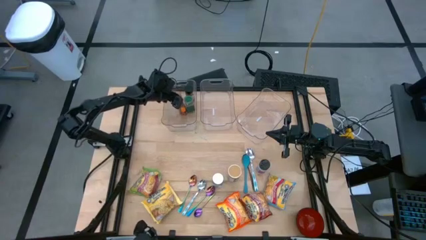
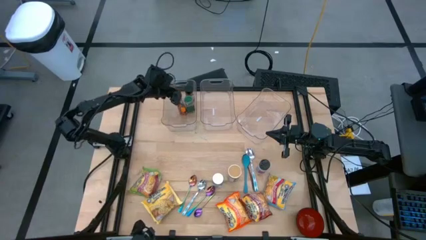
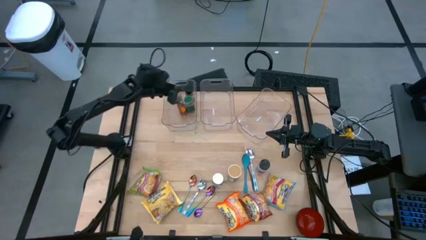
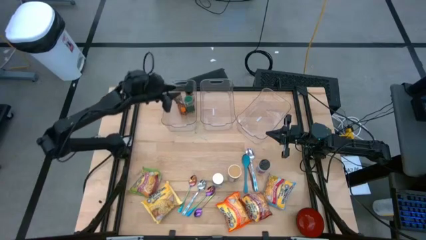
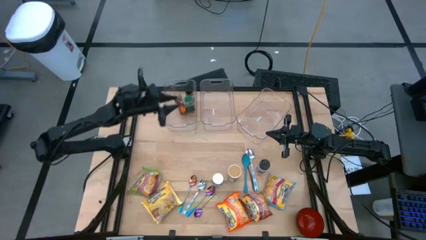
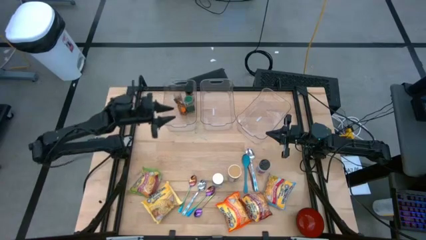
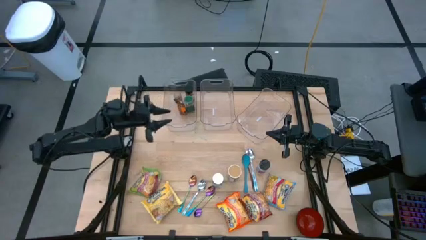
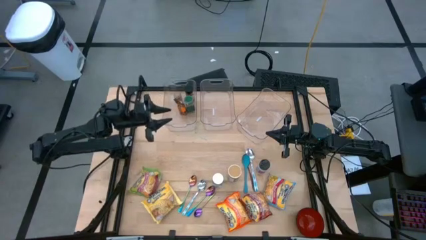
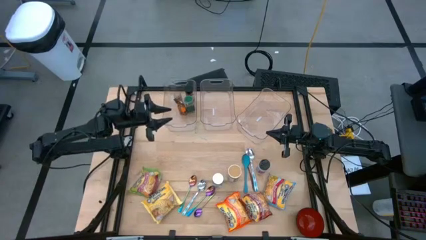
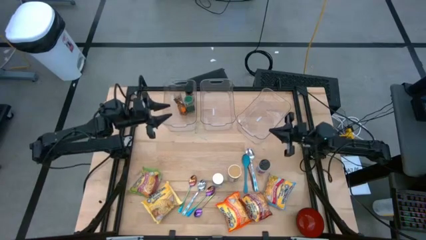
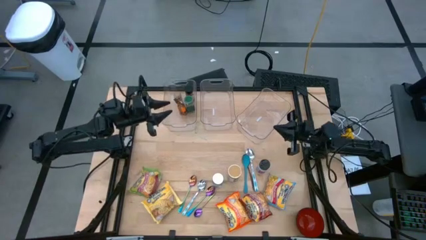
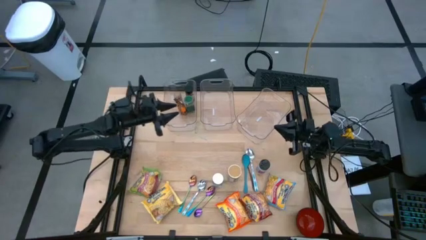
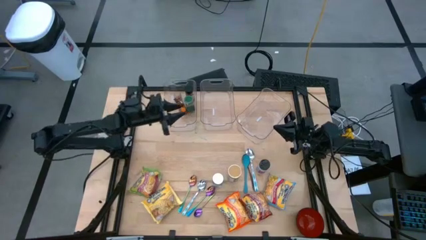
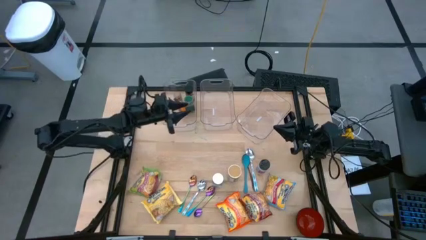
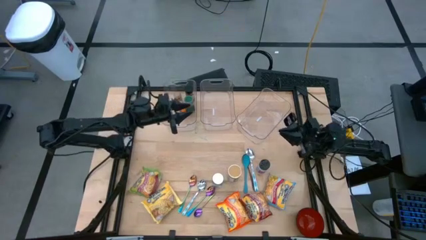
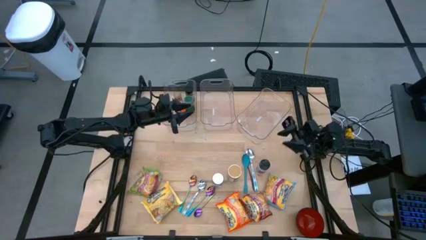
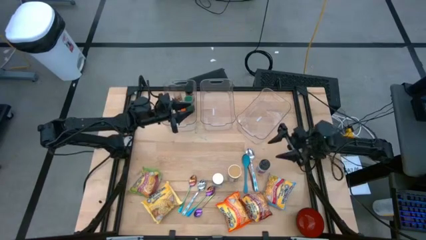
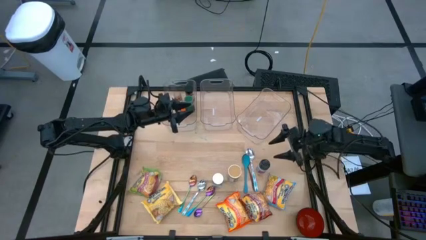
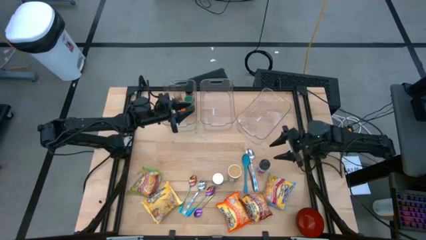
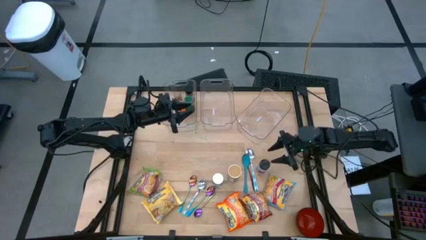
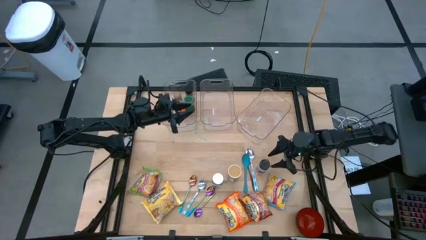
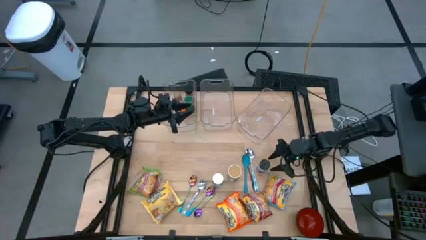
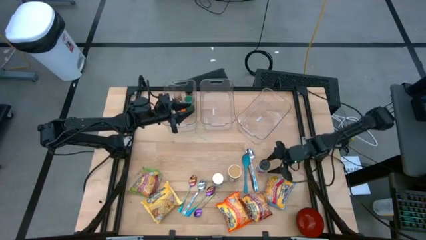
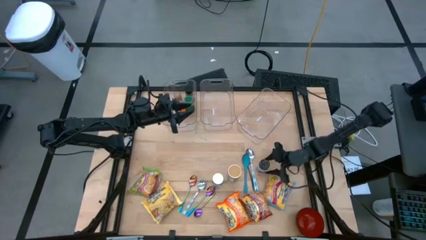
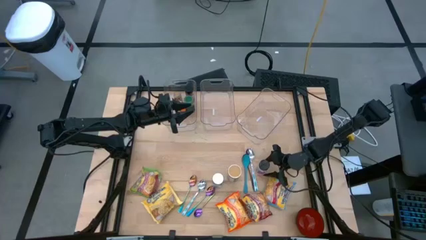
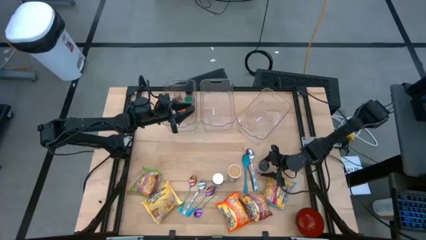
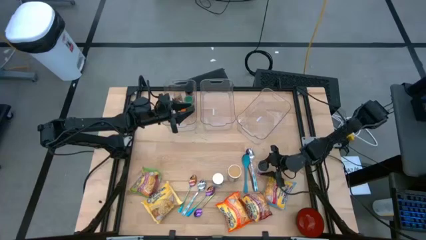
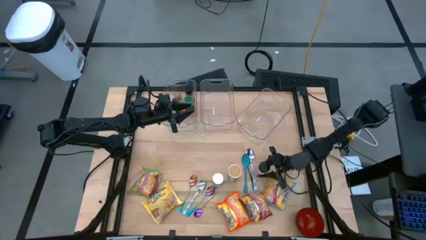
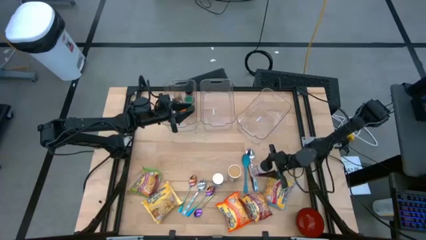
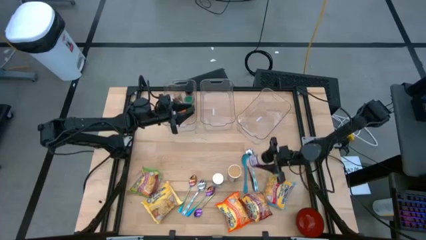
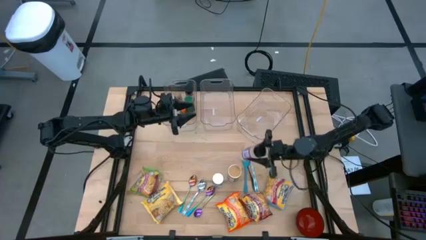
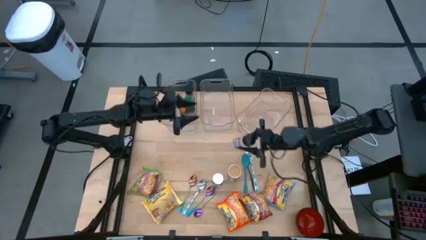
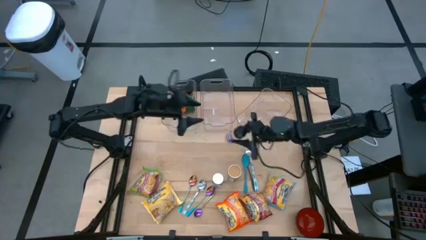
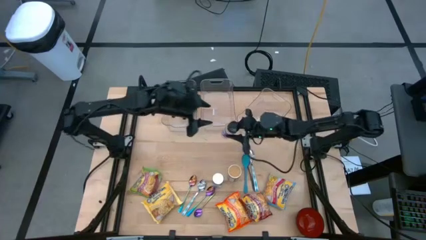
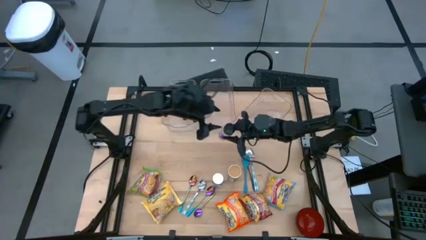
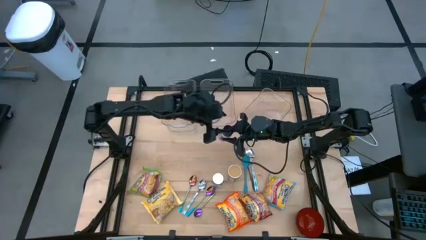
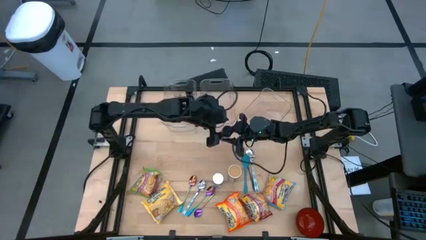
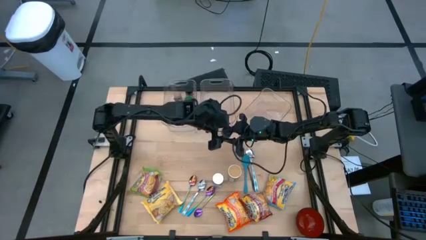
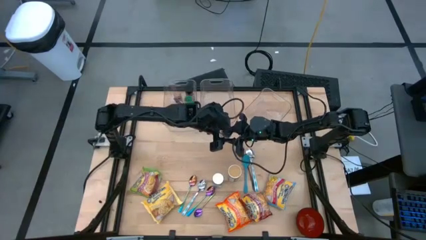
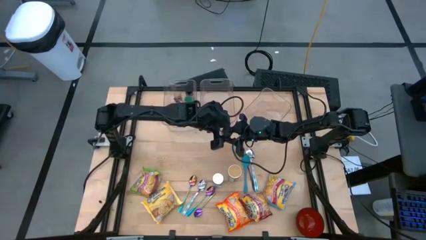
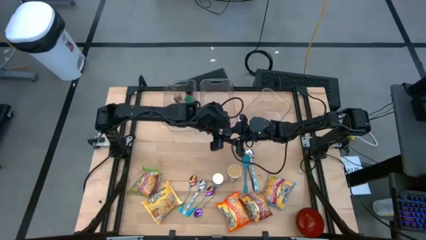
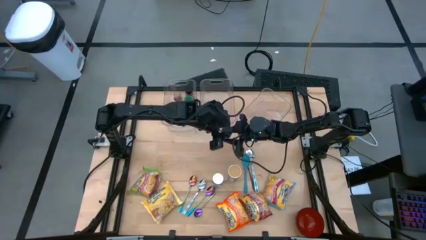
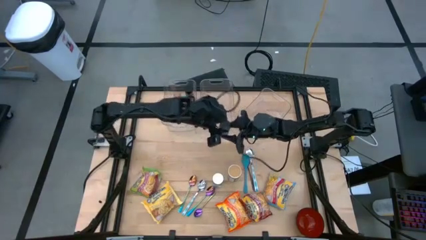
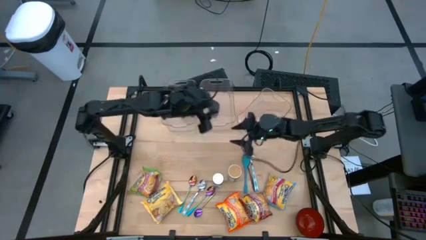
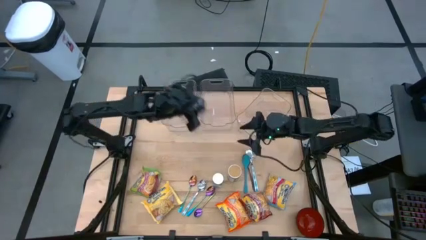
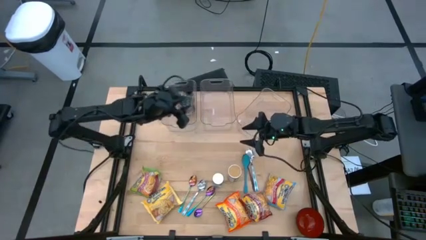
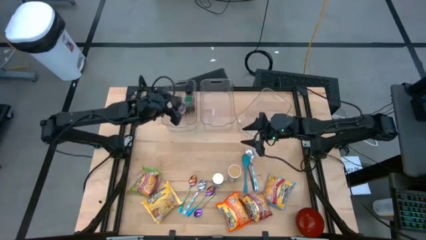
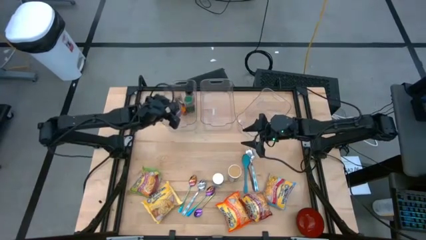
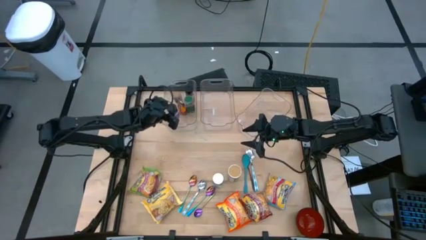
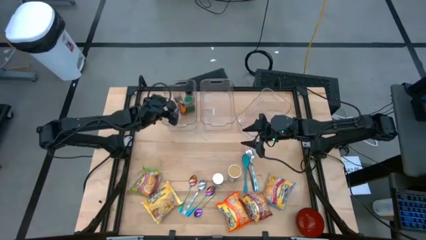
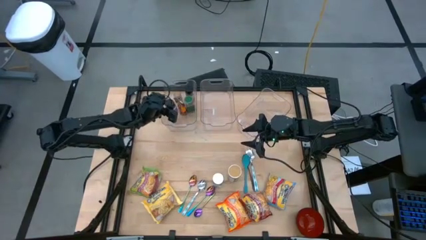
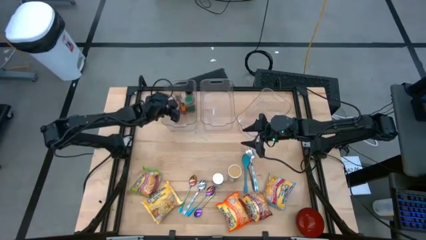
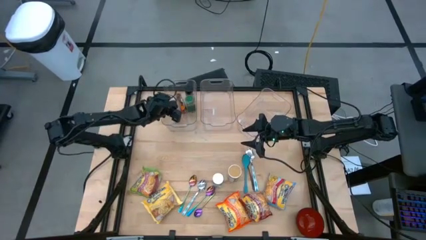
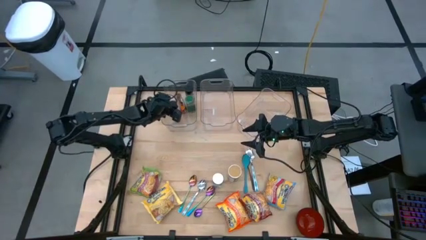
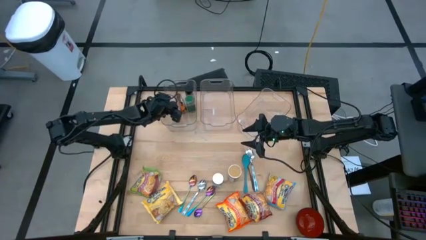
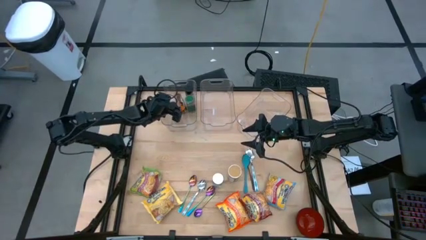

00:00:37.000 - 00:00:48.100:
Task: Pick & Place Food Item
Put the purple seasoning bottle into the left transparent bin

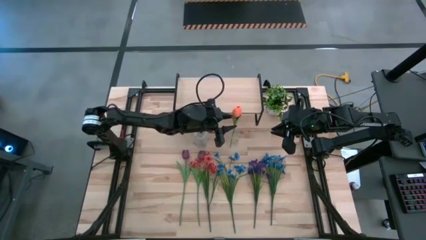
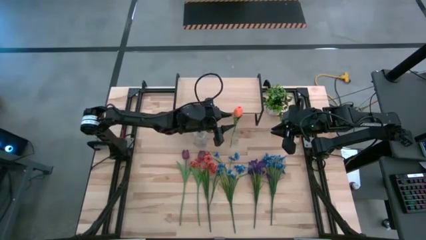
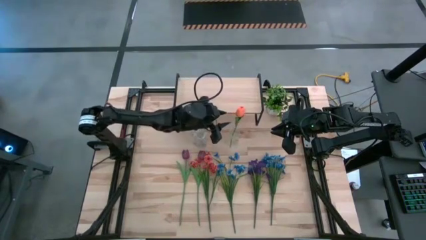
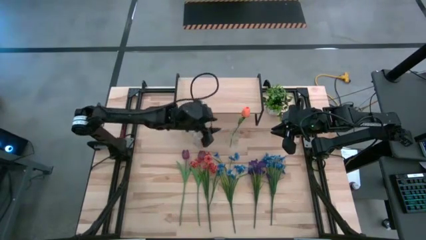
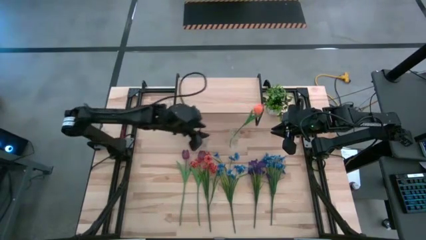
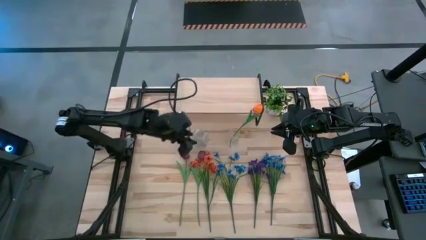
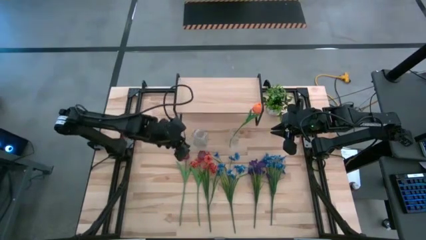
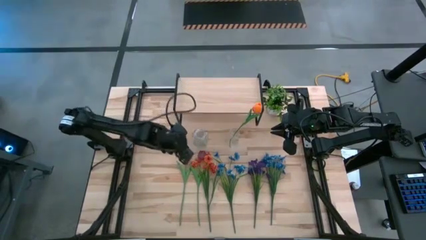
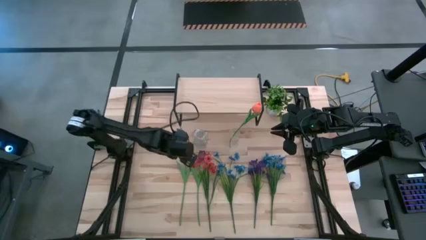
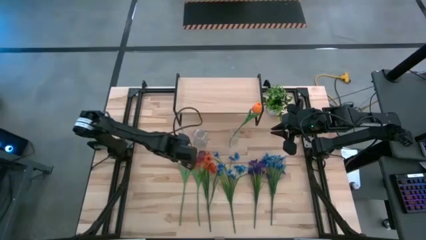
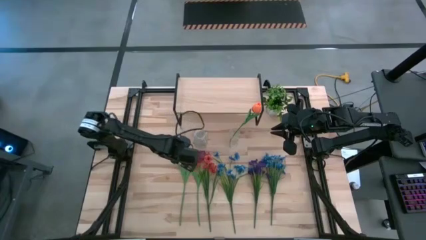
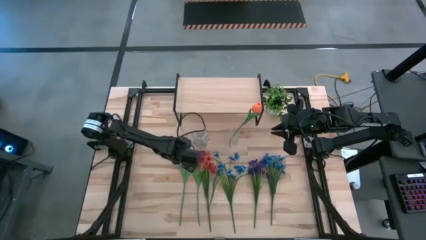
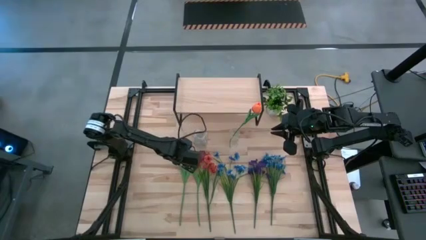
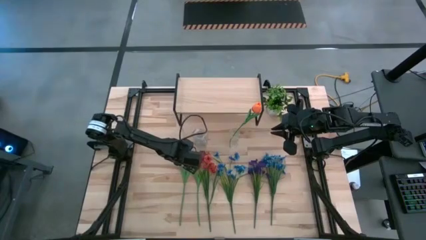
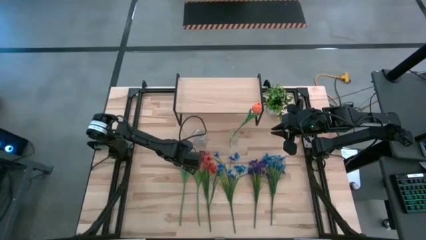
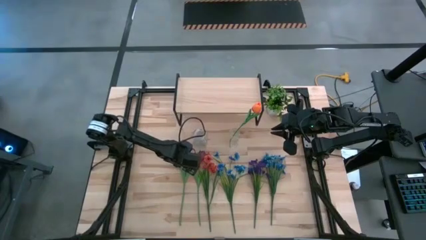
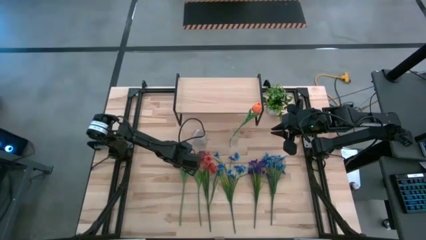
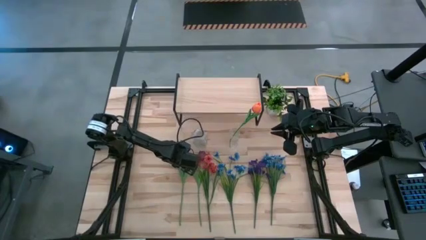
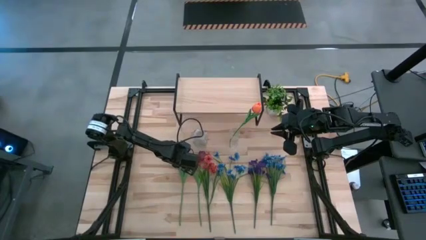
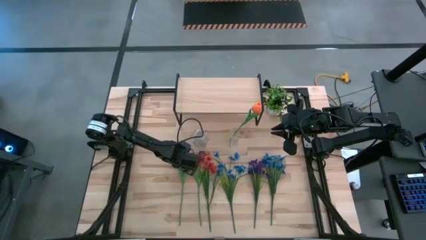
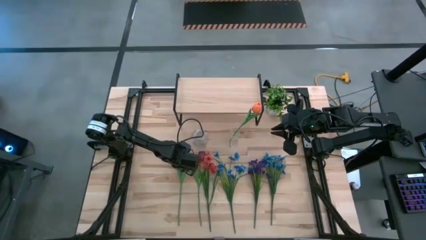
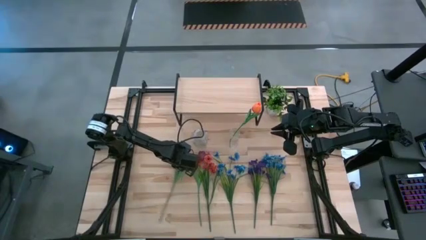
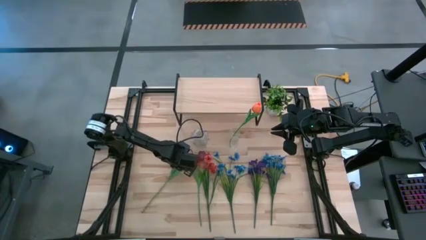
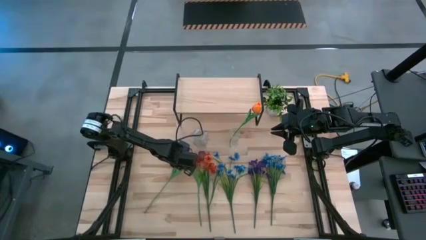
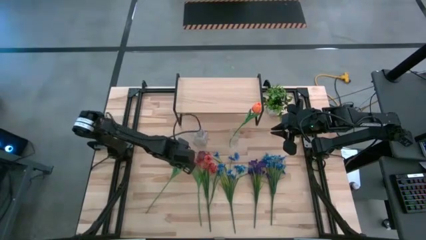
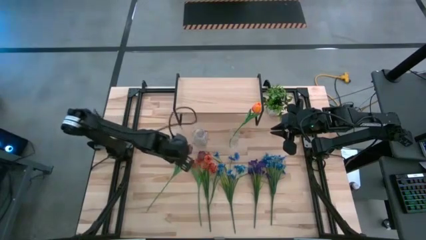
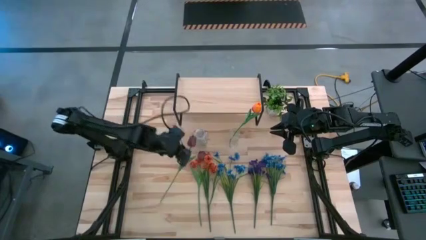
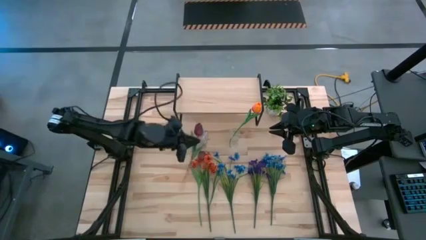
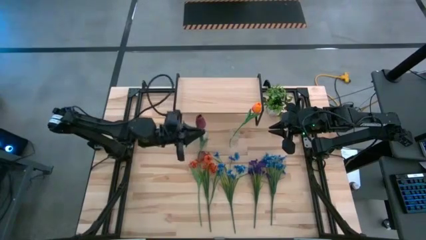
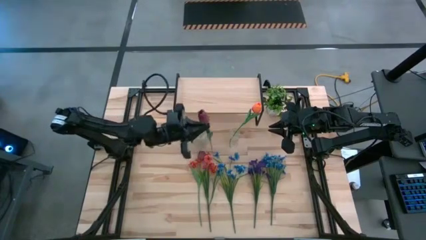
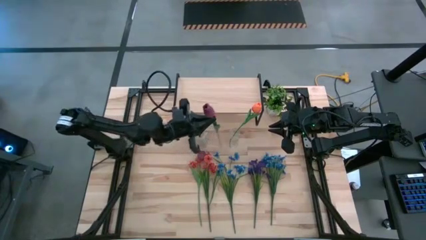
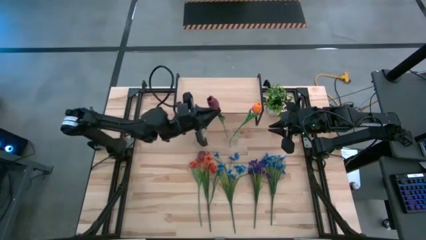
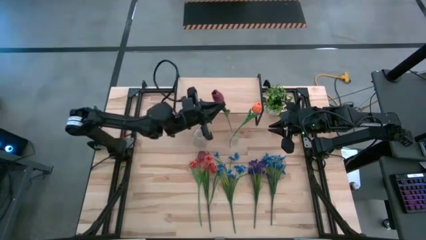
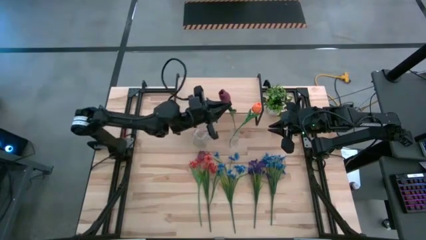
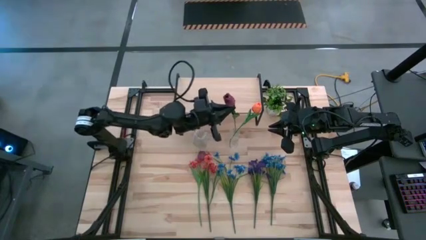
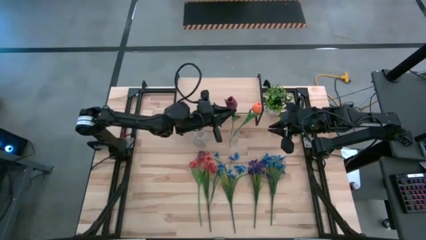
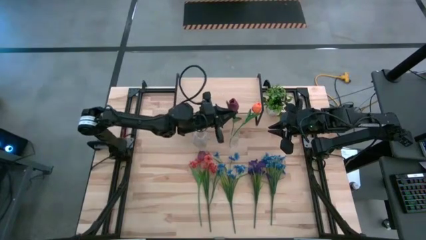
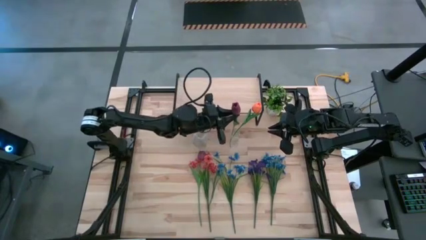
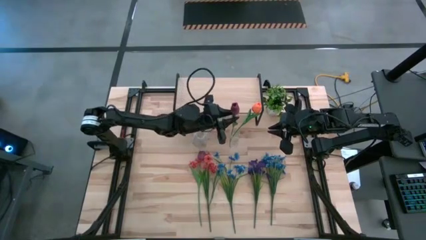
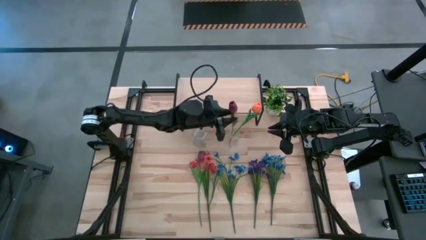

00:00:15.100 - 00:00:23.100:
Task: Pick and place flowers into a vace then onto a shelf
Put the left red flower into the right transparent vase
